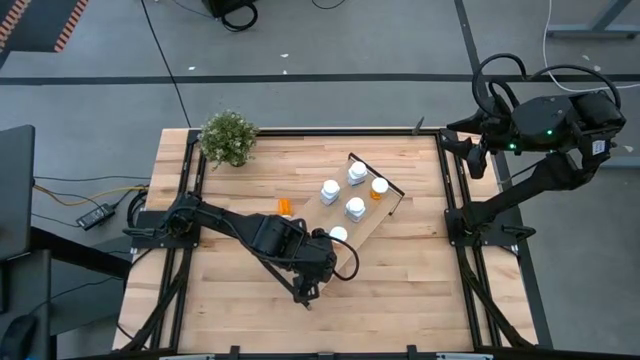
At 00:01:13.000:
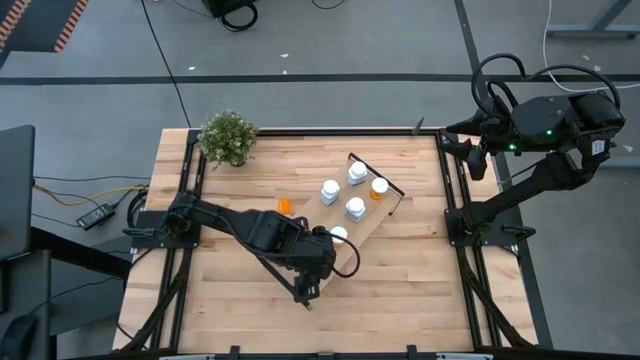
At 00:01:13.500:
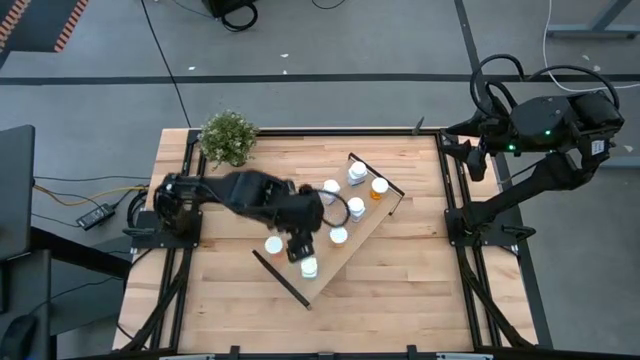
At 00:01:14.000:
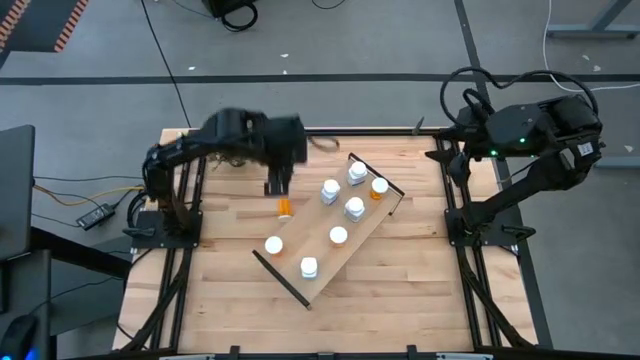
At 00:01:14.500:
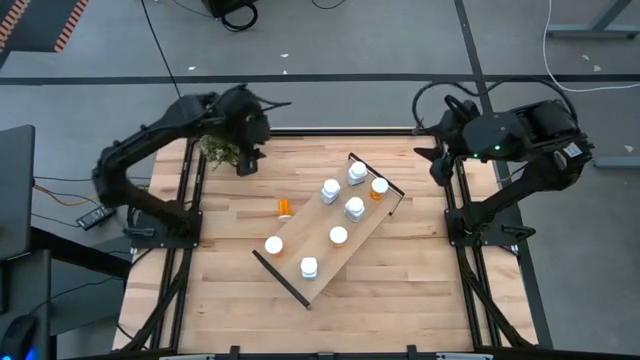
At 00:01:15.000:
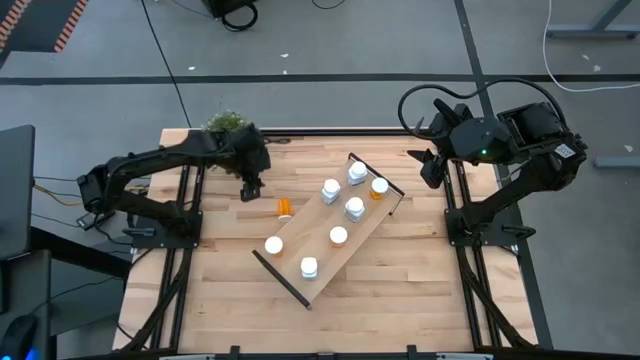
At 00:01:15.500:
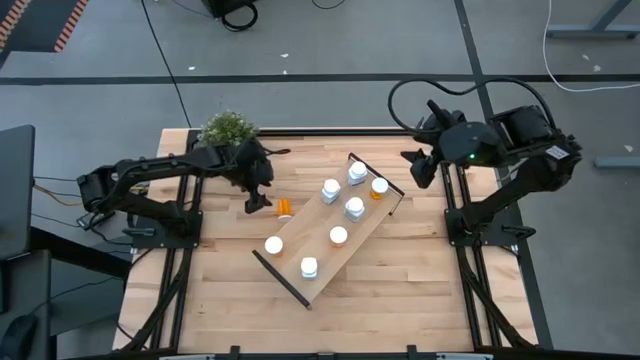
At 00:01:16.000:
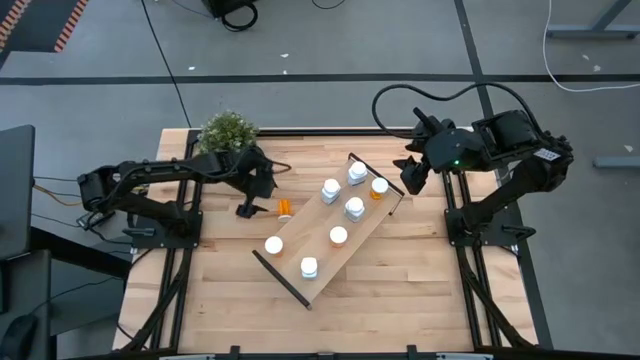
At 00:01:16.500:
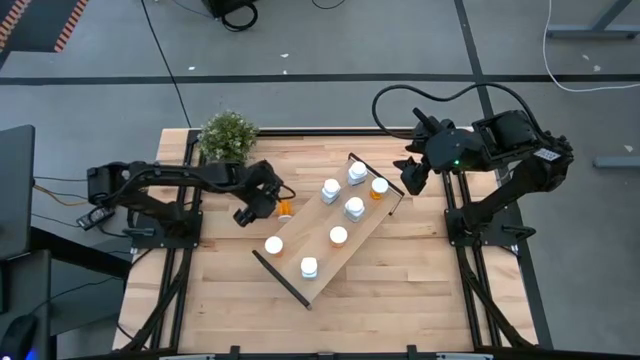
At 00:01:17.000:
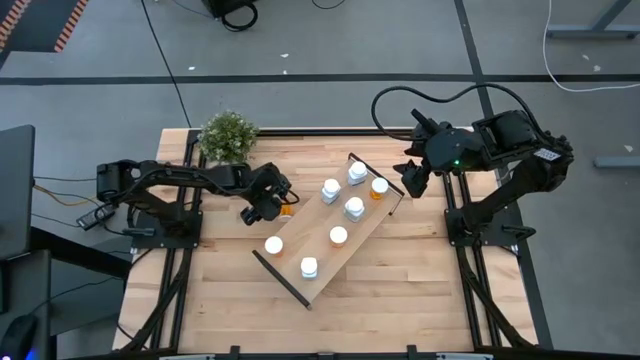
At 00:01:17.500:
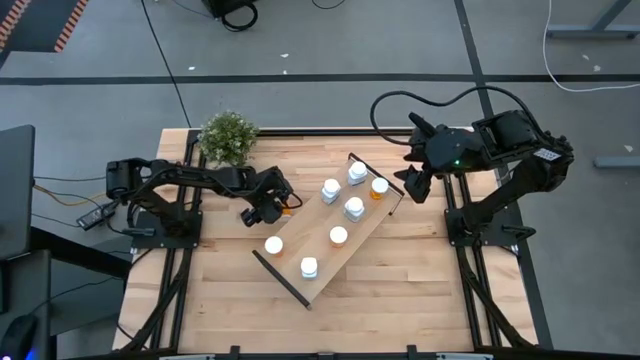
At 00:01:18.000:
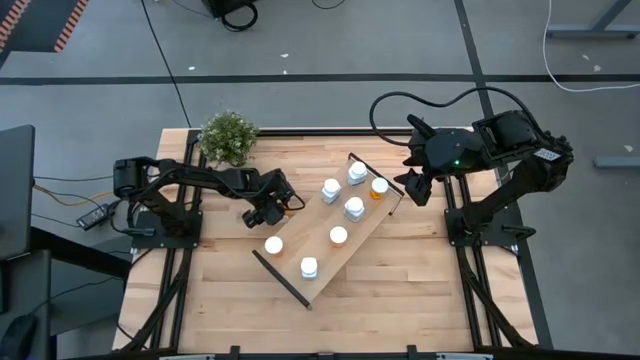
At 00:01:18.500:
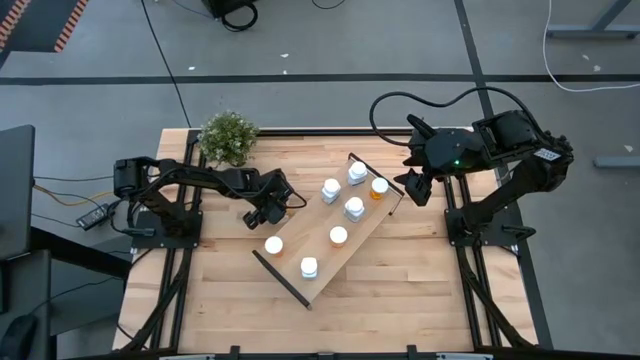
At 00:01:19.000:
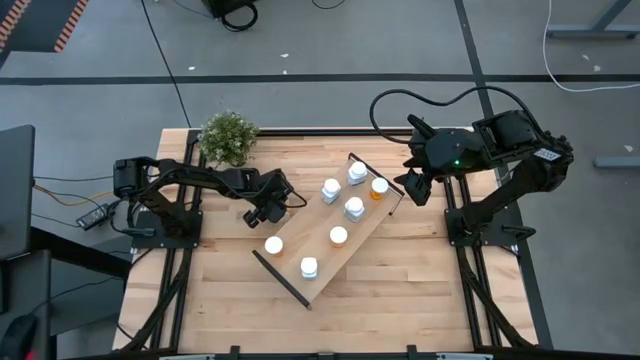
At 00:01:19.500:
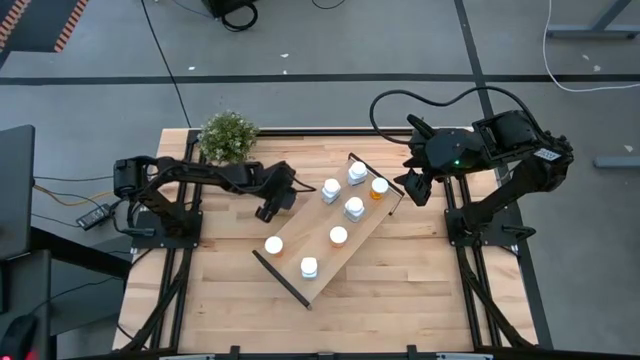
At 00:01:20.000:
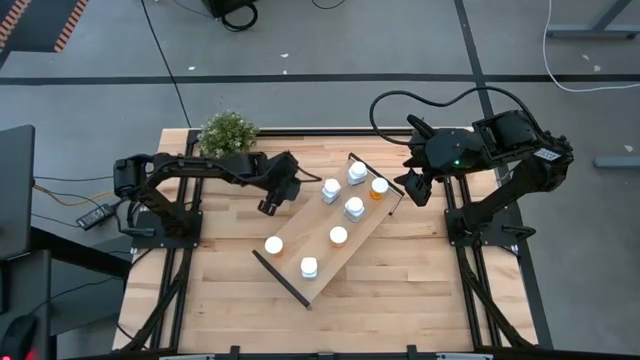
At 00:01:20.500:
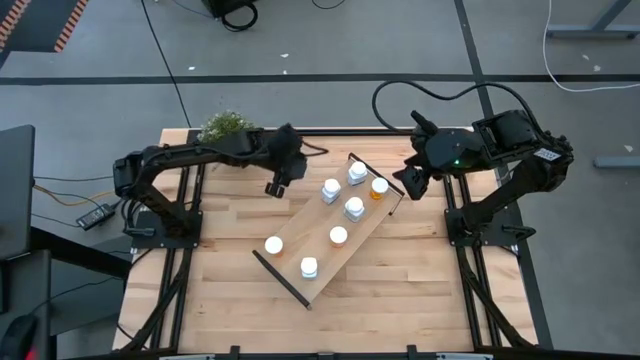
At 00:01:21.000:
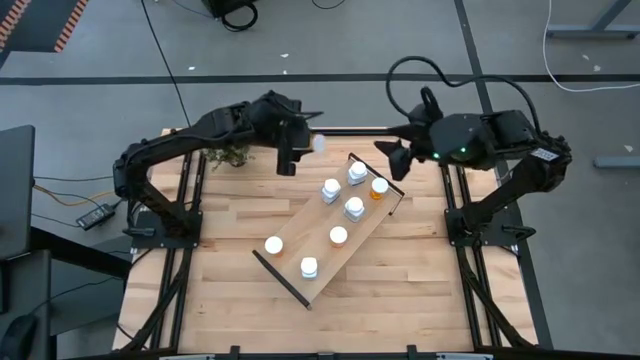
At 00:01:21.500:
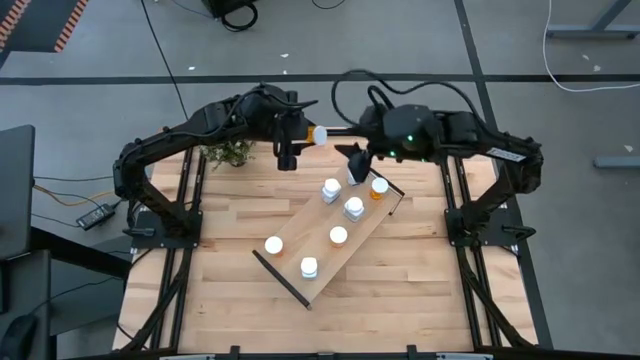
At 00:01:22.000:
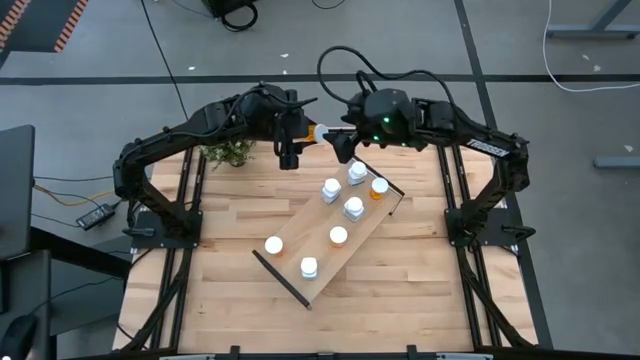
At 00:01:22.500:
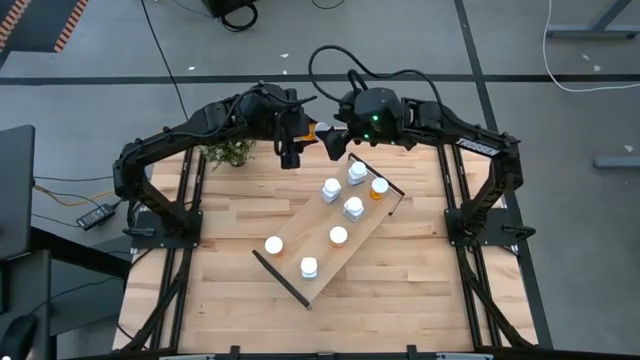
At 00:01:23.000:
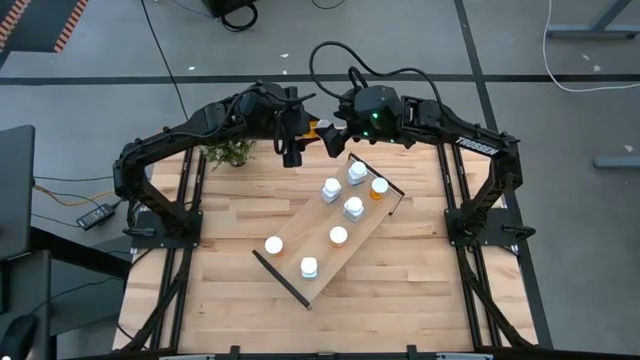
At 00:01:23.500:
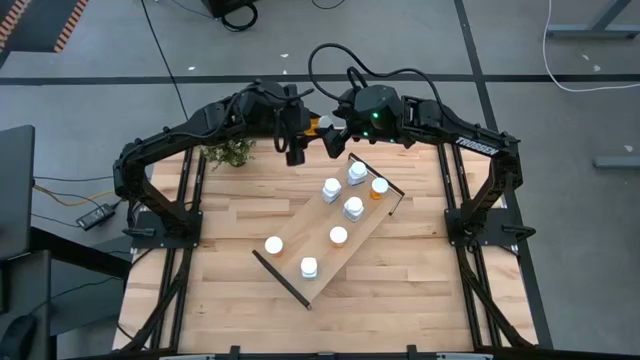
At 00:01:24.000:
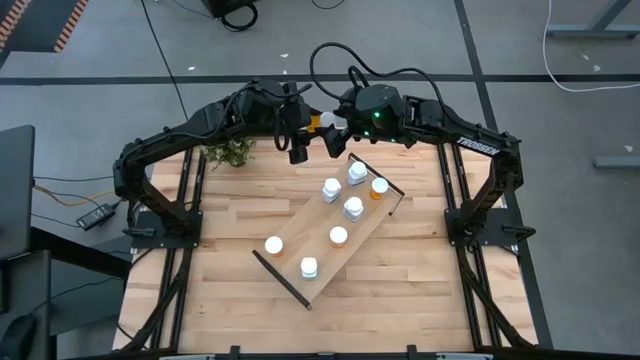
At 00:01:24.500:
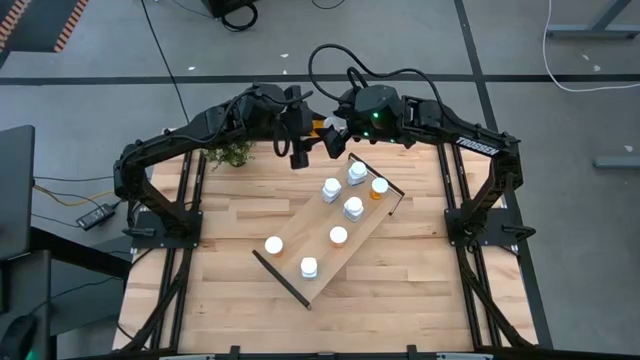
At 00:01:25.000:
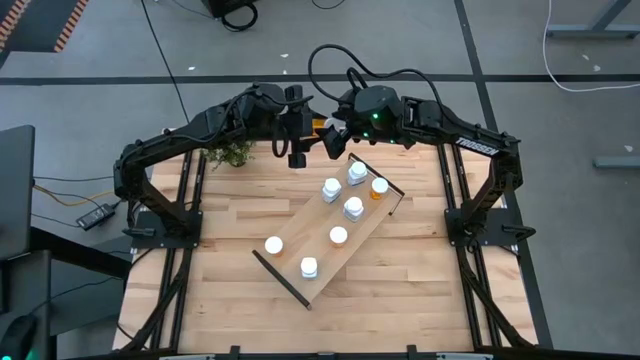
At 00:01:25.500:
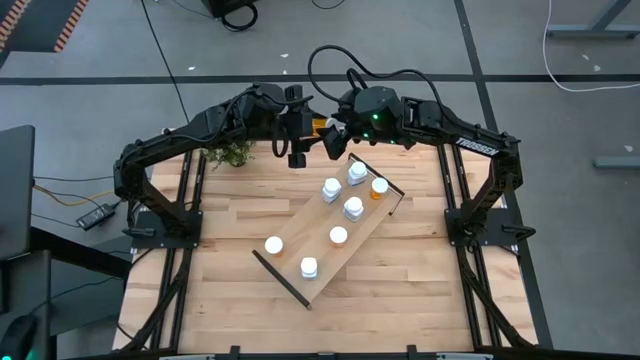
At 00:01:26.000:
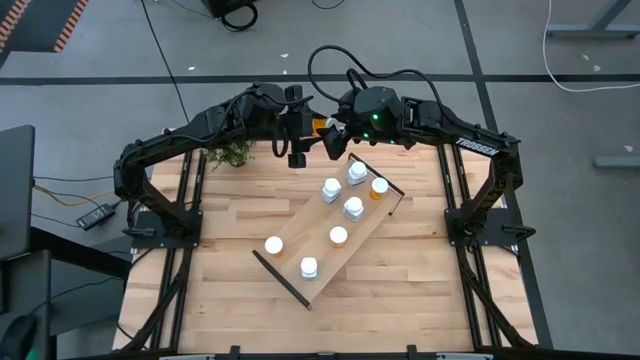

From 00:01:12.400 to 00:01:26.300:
Task: Pick and place medicine bottles onto shelf by color
Put the orange pill bottle on the shelf

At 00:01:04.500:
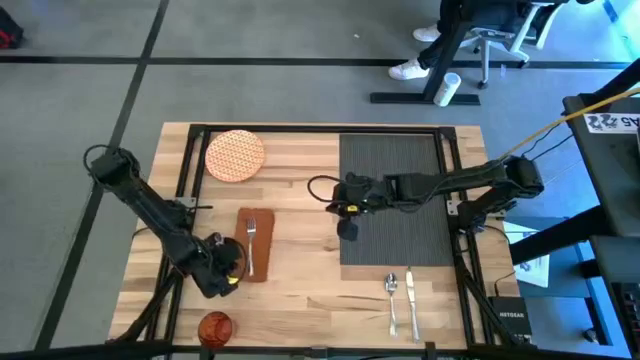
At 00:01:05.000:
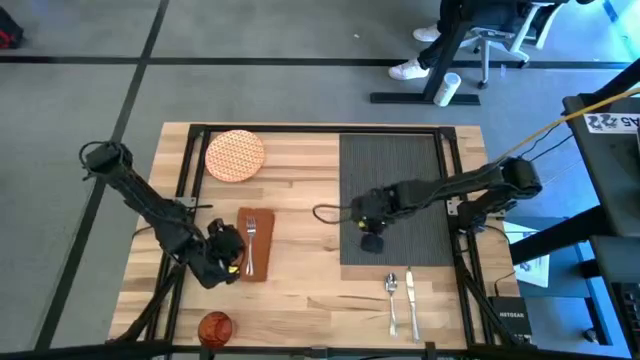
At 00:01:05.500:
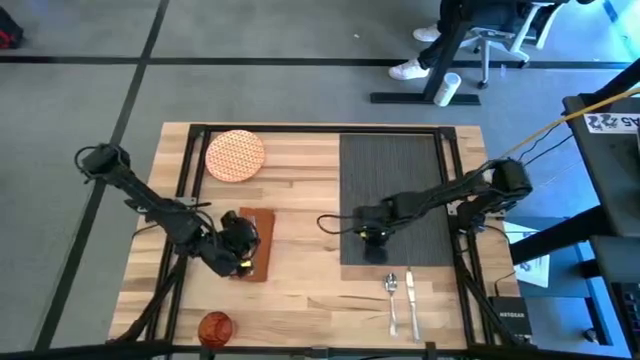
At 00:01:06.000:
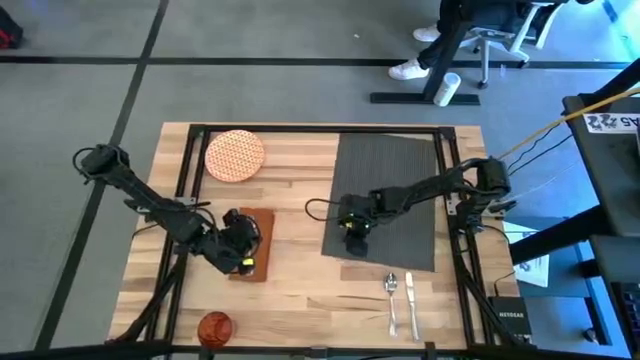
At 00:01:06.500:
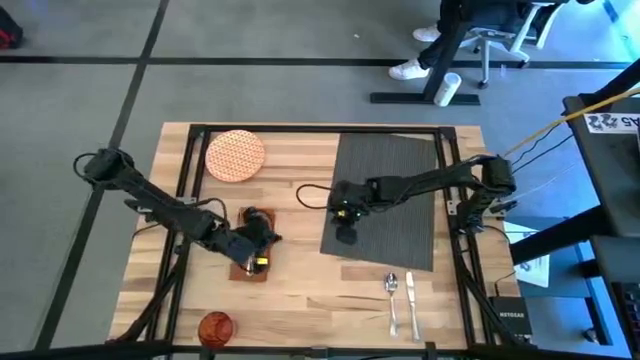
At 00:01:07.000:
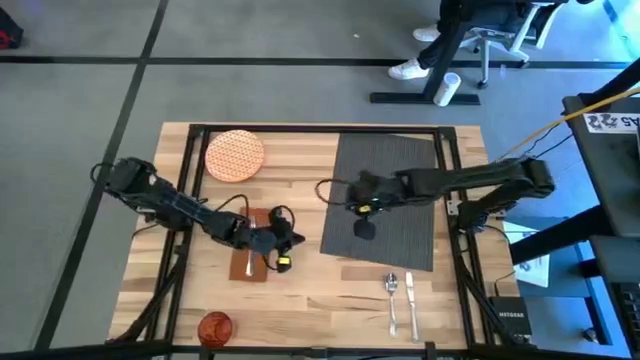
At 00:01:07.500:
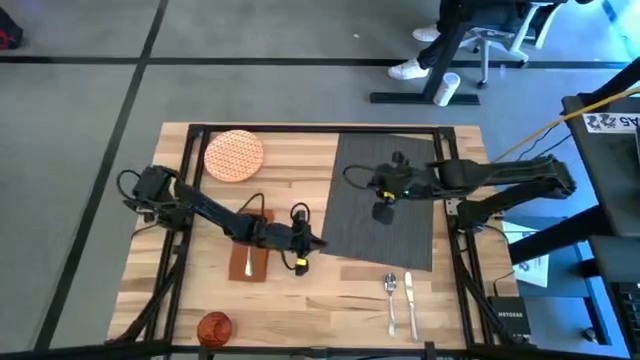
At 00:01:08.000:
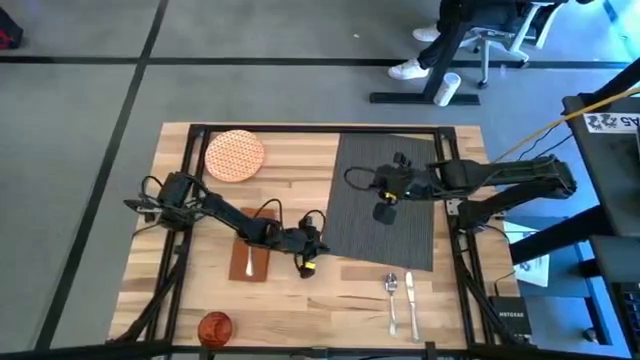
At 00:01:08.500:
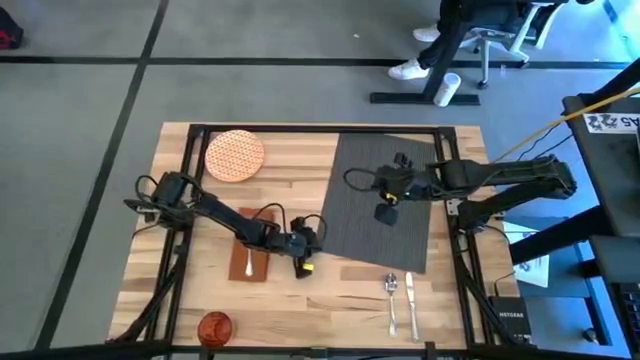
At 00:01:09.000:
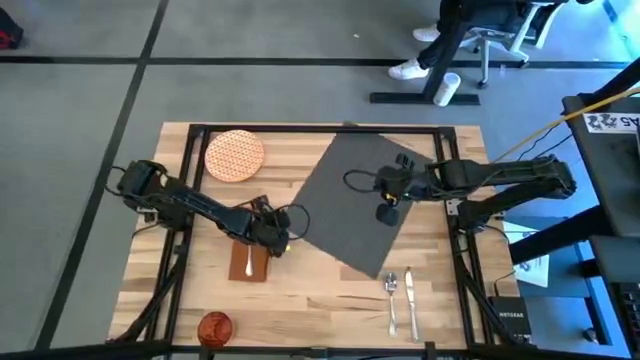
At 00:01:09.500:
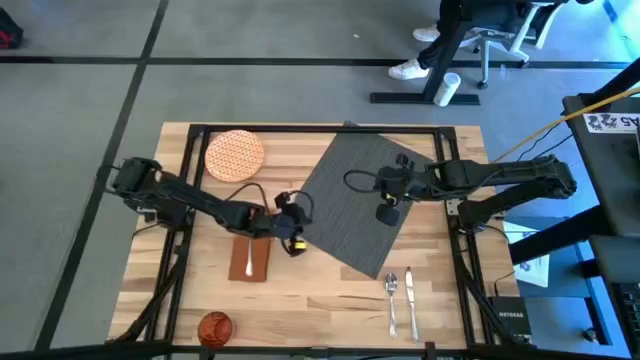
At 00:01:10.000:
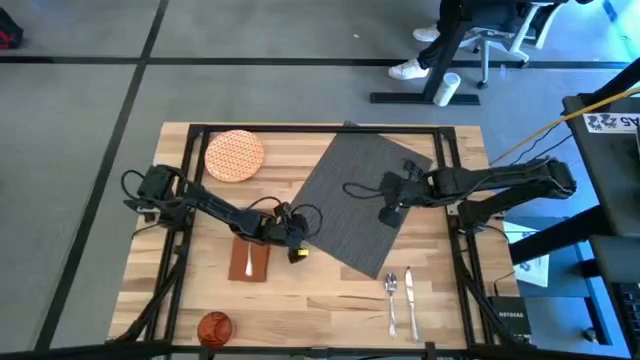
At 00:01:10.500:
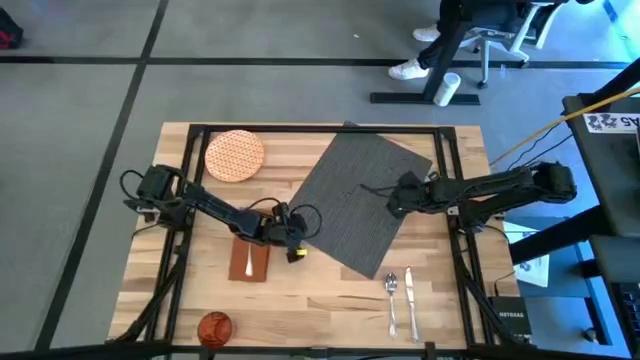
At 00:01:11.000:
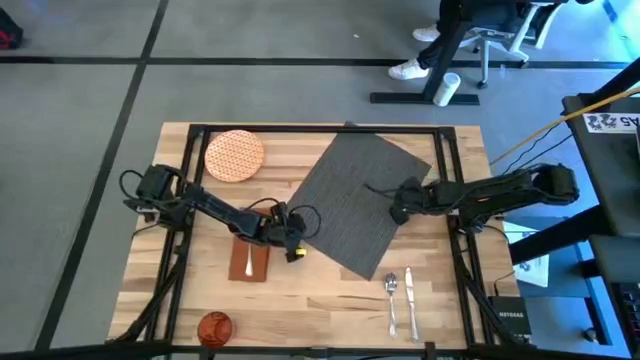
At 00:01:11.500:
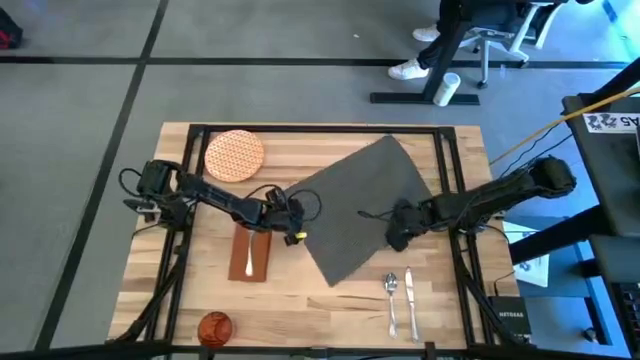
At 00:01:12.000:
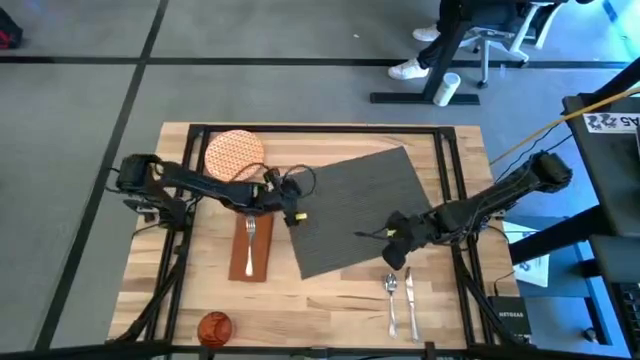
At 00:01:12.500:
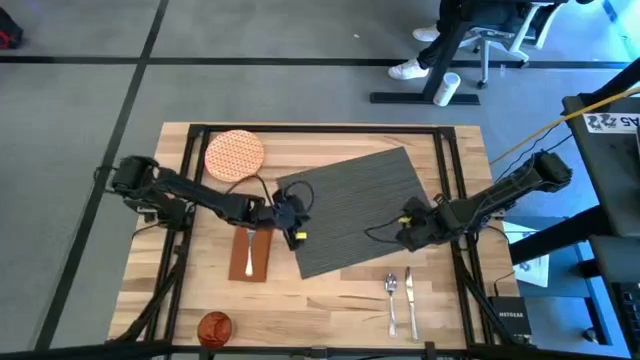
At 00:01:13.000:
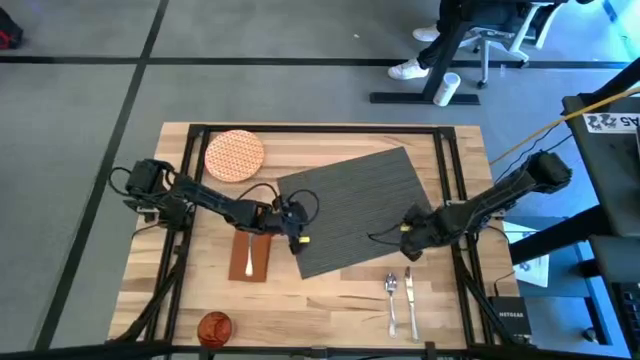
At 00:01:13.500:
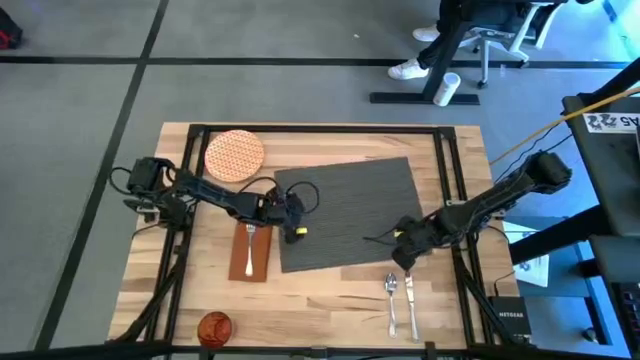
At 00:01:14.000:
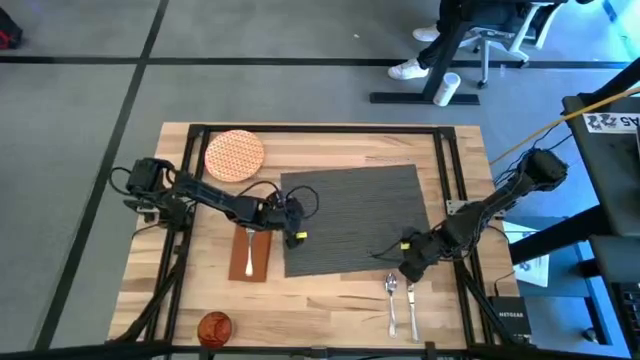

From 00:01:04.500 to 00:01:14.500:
Task: Set table place
Move the gray tablemat to the center
